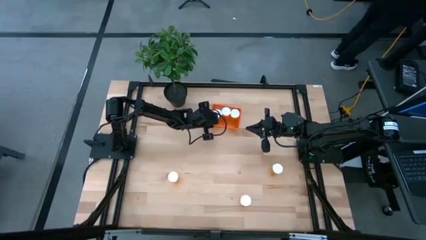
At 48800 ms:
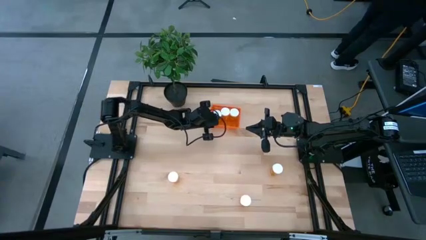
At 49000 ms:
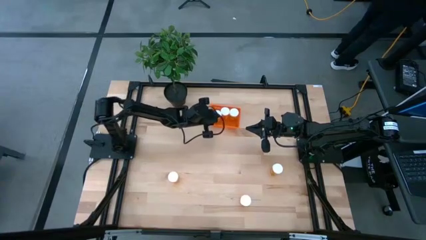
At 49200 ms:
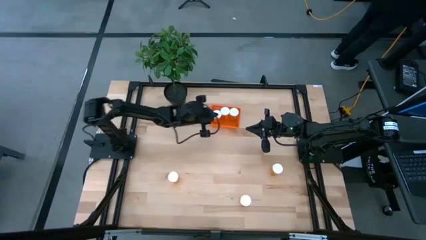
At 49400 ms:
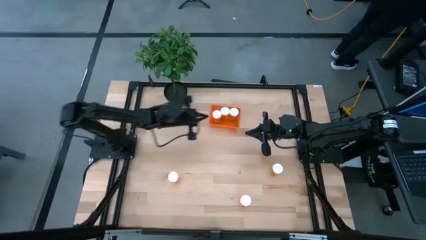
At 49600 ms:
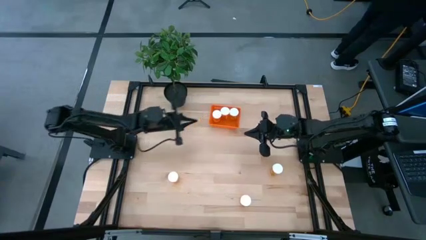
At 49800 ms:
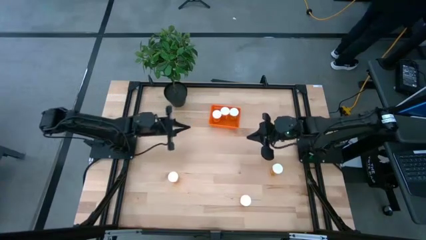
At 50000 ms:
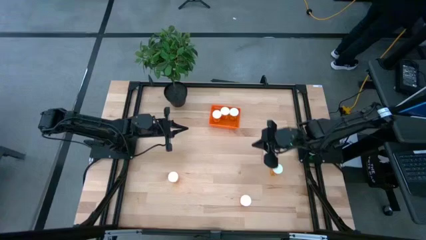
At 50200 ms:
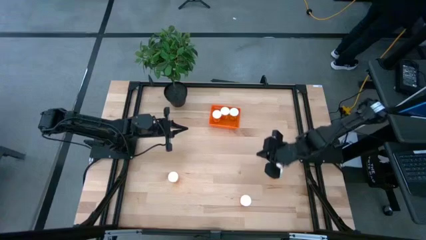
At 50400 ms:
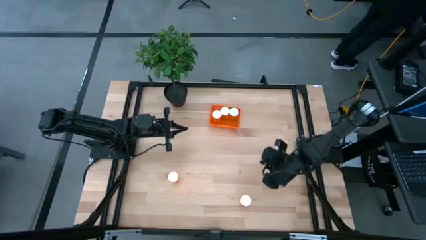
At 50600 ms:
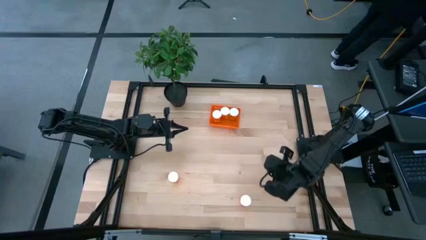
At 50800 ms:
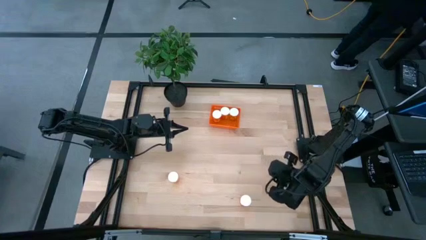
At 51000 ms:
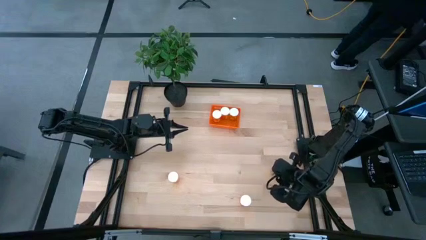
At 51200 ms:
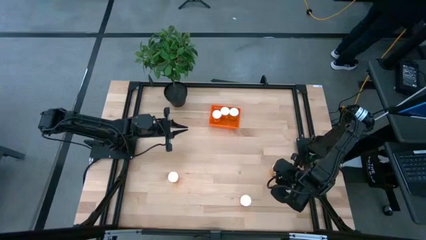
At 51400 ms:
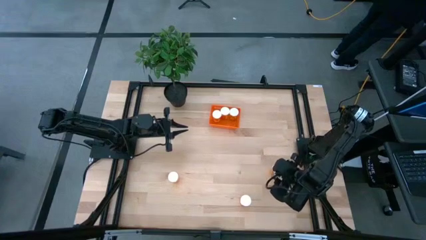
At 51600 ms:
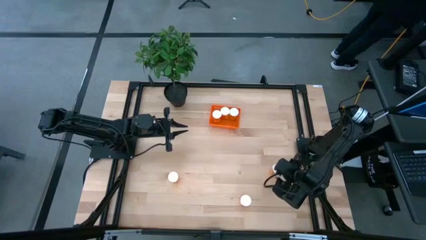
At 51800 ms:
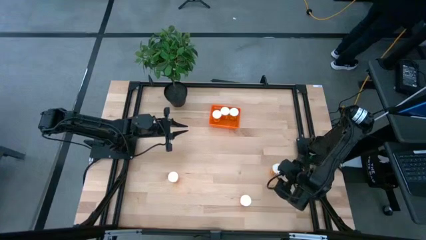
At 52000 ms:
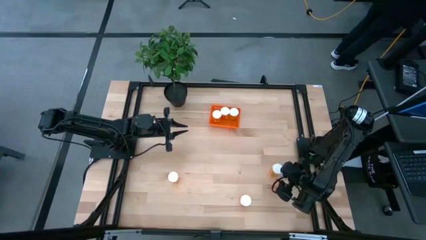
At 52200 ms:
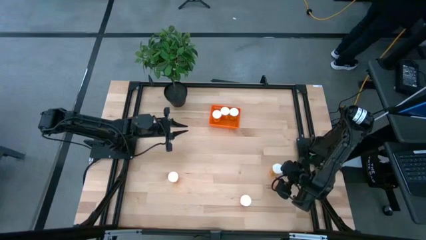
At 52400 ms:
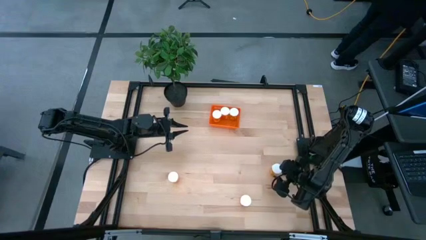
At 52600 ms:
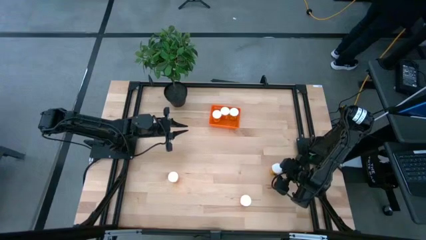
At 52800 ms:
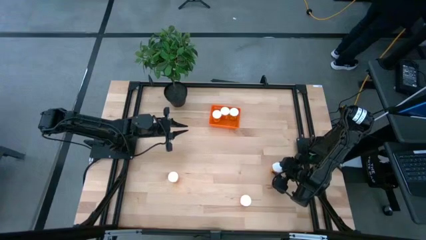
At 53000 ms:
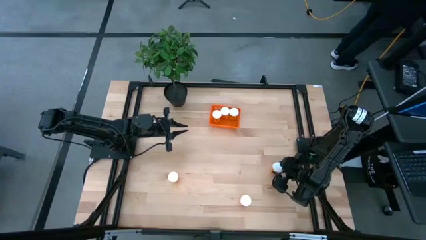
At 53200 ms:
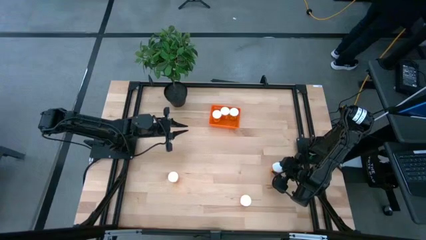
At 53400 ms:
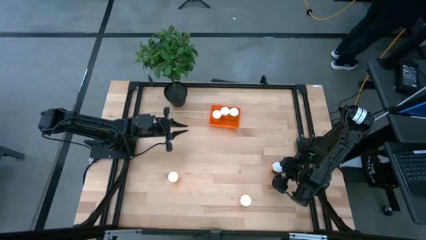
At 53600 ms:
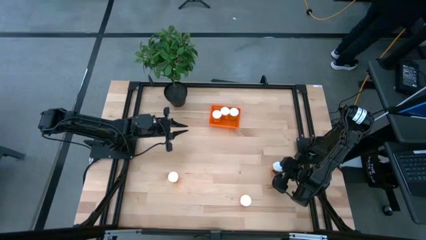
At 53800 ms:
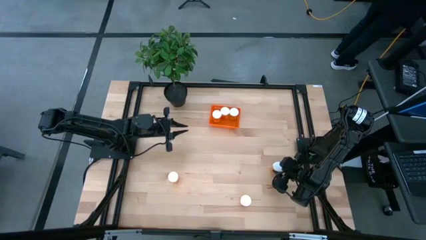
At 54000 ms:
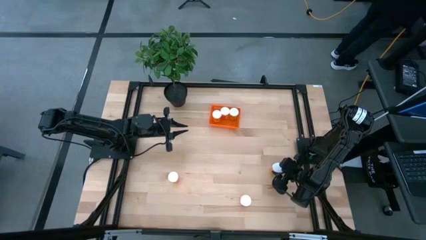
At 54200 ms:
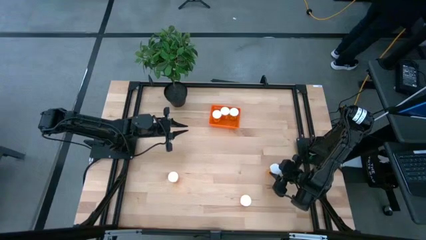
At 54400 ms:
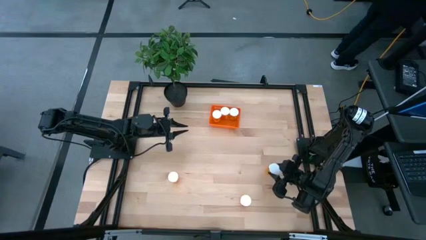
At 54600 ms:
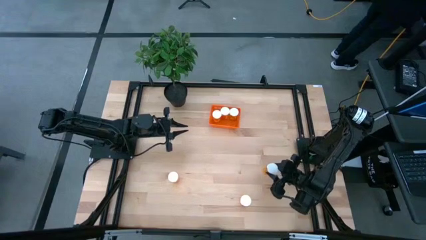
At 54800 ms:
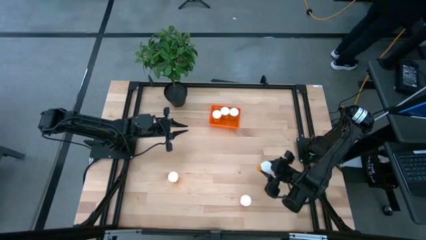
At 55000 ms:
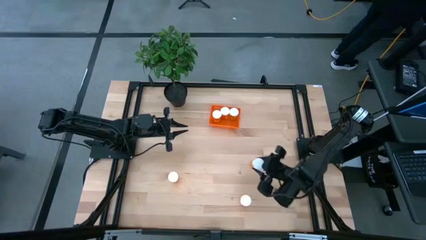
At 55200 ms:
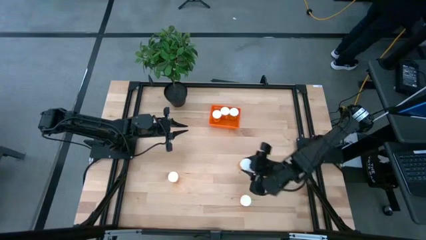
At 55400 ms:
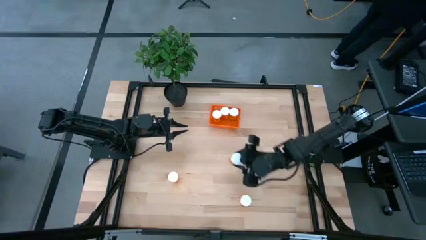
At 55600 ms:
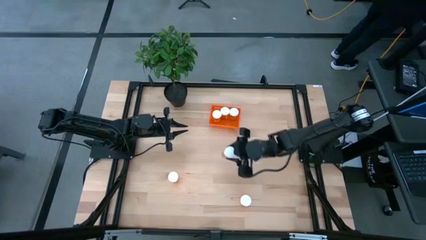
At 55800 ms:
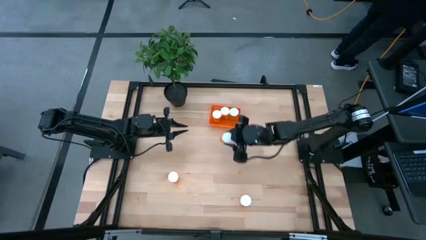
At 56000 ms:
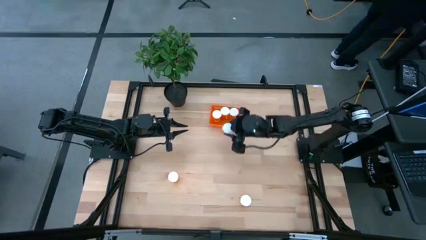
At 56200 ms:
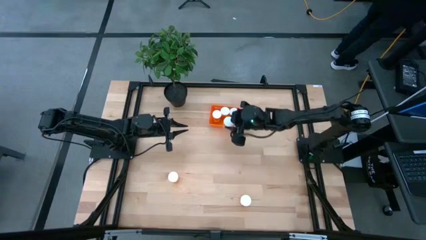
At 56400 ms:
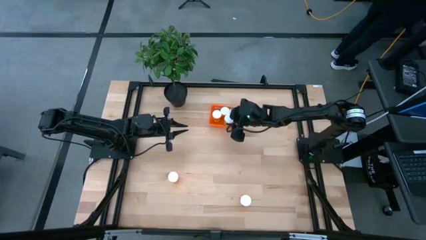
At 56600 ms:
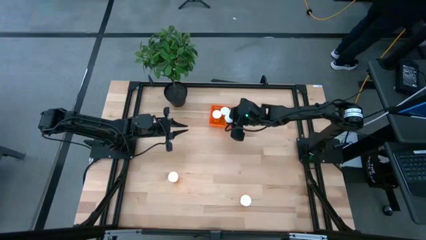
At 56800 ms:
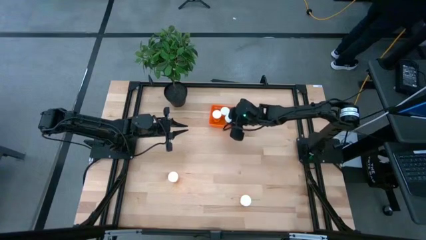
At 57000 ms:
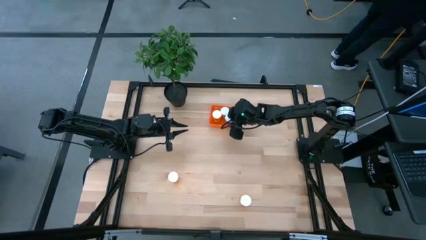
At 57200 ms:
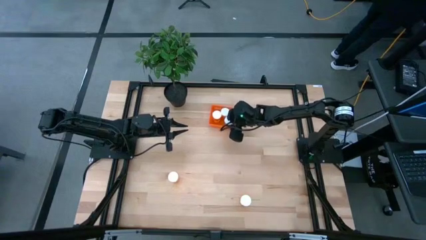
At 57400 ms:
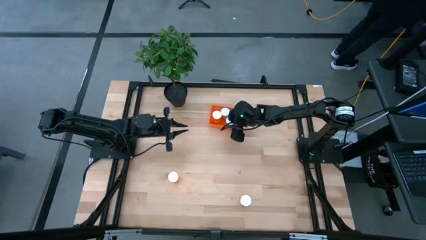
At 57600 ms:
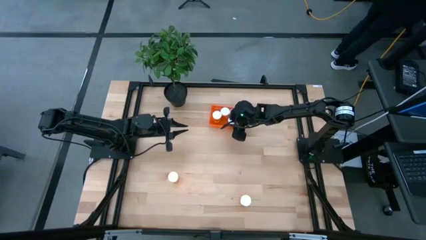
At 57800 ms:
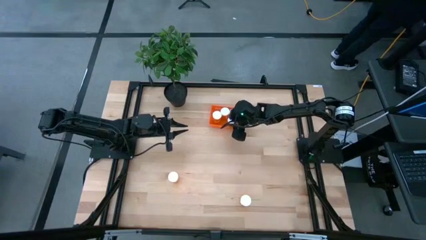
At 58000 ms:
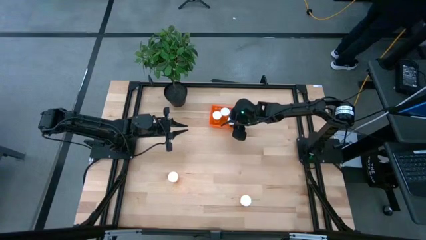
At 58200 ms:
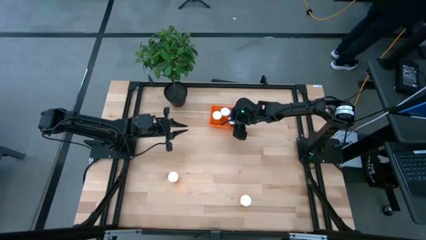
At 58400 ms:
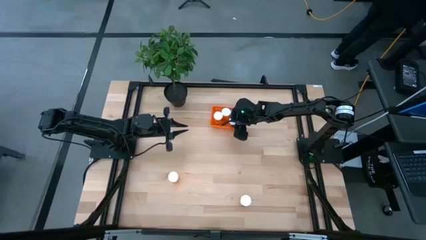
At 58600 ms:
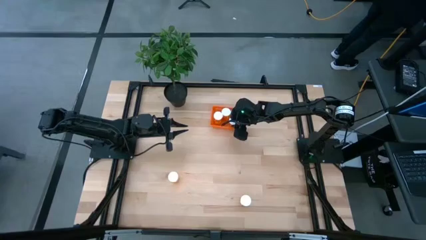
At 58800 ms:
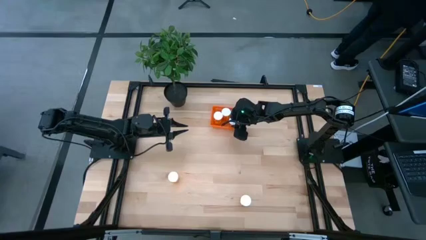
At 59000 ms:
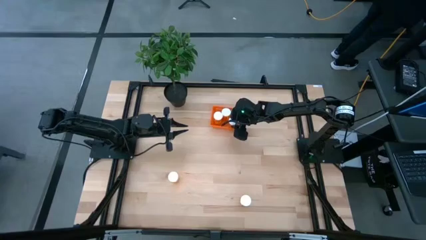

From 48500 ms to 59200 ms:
Task: Pick and place pill bottles into a basket
Put the top right orange pill bottle into the orange bin

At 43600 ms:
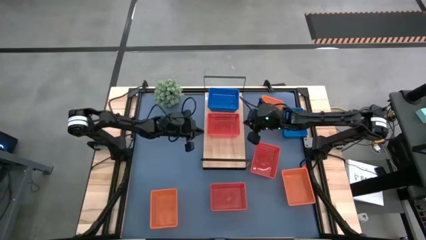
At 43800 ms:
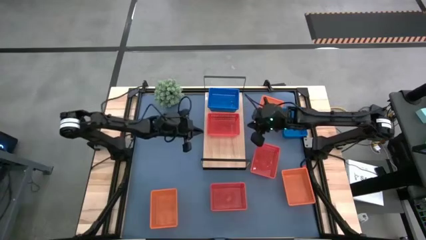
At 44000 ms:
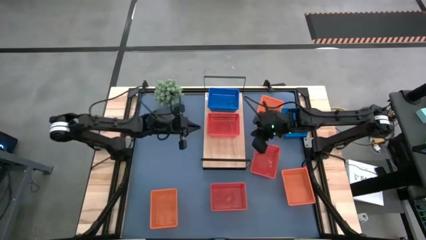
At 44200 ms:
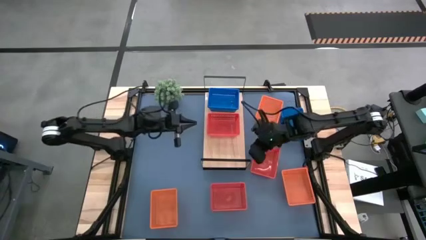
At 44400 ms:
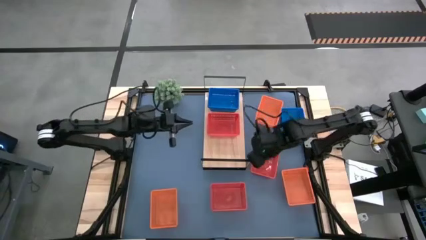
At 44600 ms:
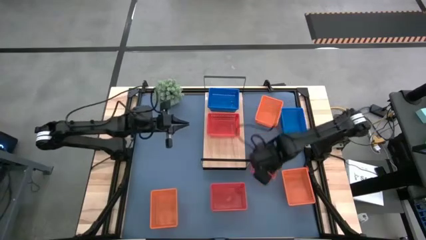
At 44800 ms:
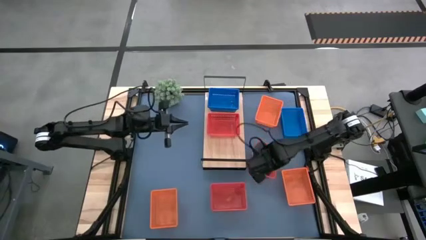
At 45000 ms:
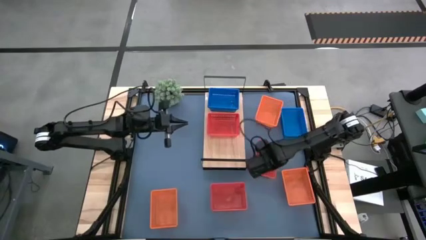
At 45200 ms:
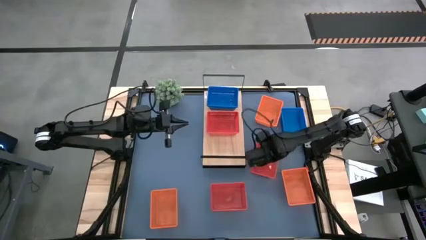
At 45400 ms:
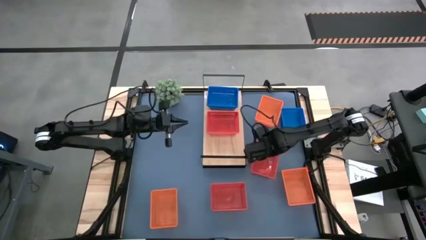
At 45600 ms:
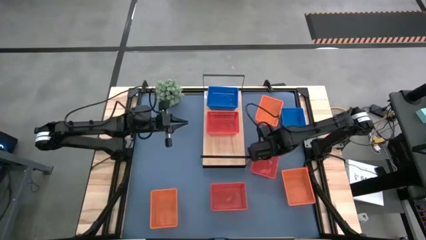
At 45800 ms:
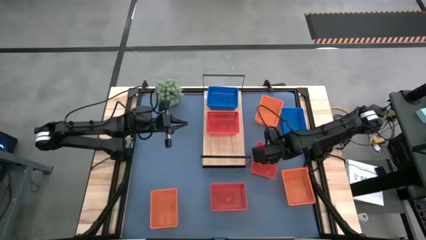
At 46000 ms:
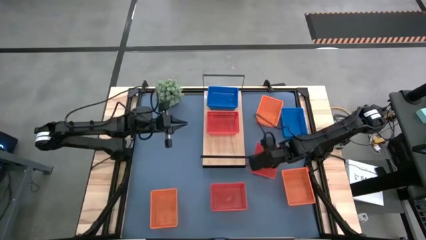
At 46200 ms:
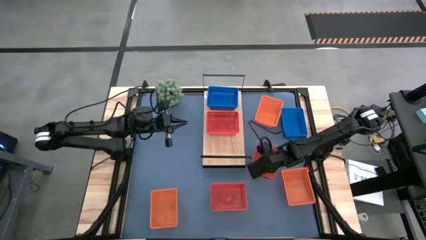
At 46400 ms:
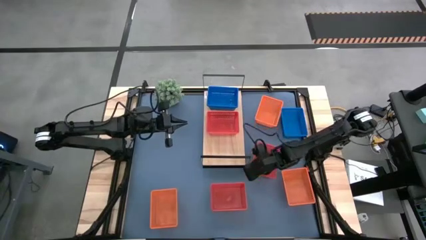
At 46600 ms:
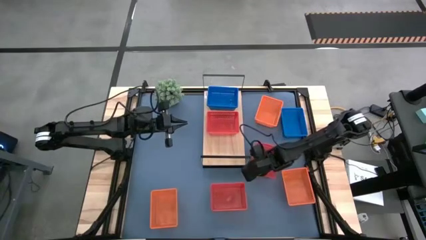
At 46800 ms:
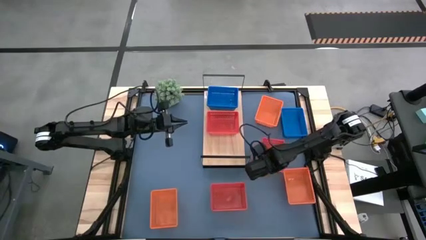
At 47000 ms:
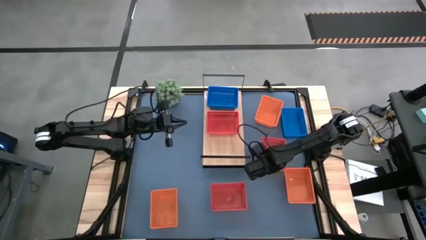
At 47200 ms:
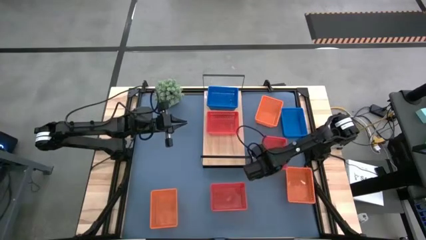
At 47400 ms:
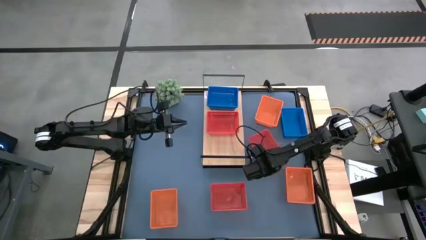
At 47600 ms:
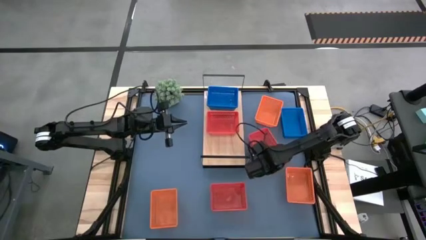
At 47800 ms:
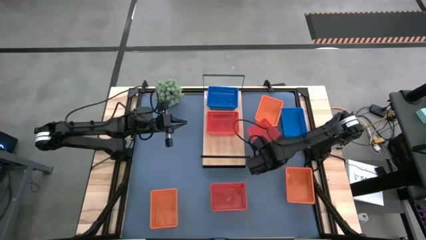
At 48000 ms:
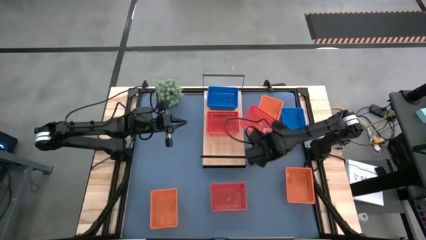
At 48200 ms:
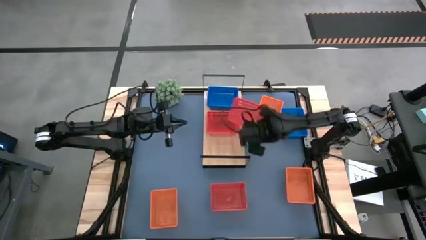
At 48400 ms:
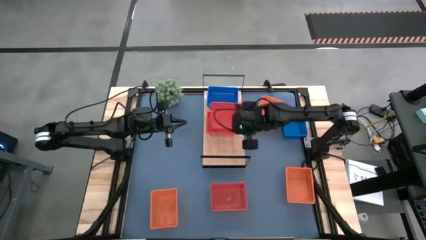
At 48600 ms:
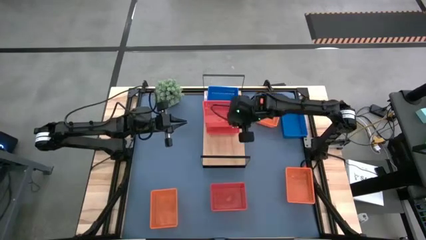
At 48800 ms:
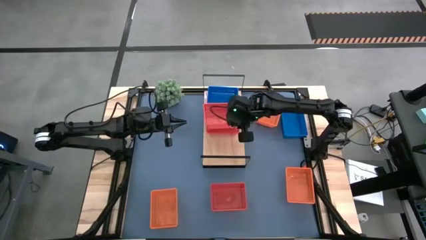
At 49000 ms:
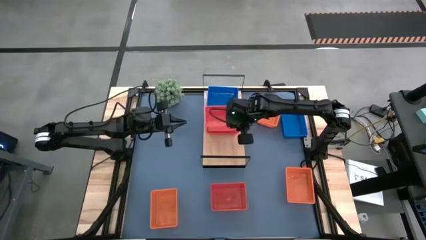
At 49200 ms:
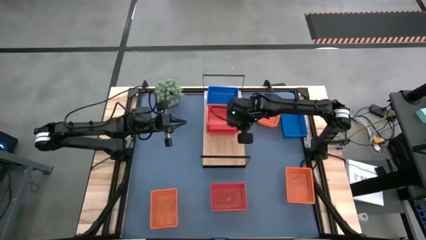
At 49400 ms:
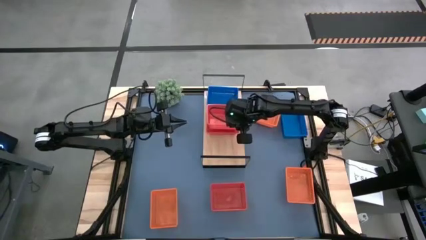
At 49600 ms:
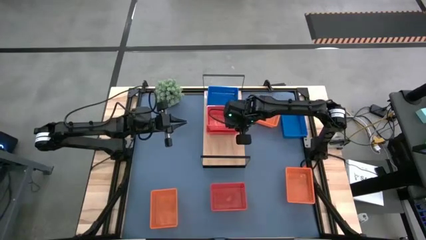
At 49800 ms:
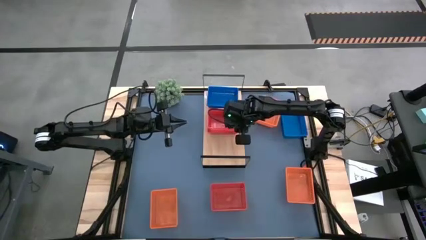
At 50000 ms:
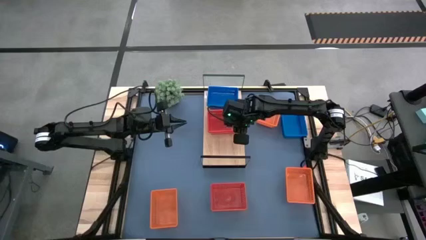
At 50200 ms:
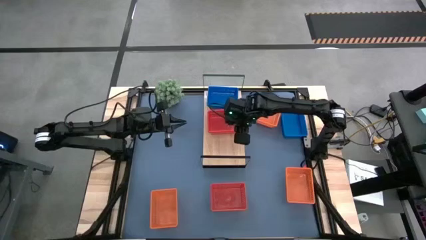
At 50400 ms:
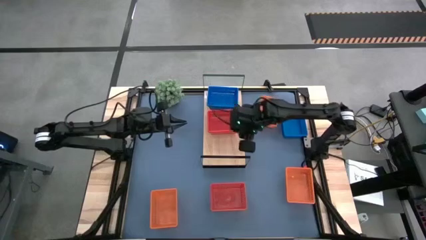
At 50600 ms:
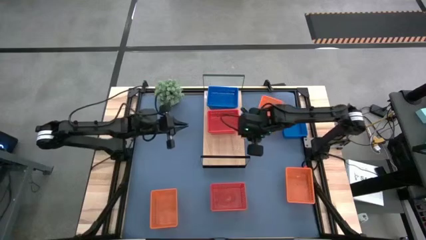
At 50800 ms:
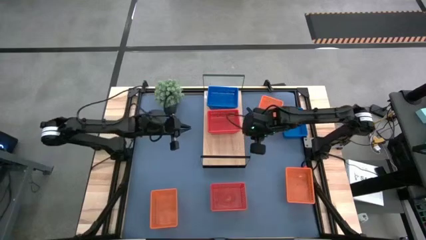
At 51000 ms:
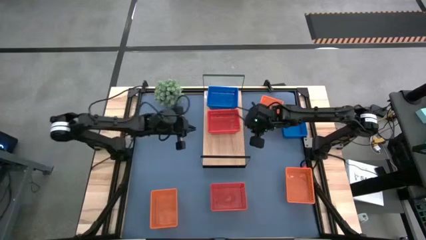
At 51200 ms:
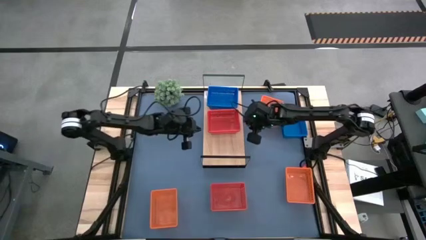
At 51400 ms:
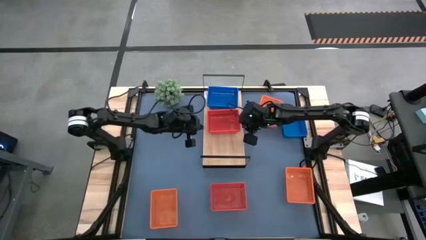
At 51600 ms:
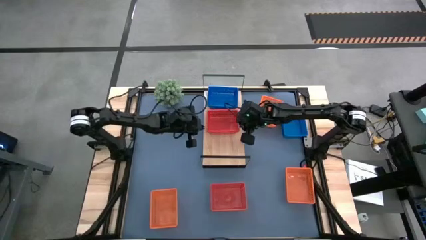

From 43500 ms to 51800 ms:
Task: Stack baskets on shelf by color
Stack the right red bin on top of the red bin on the shelf
